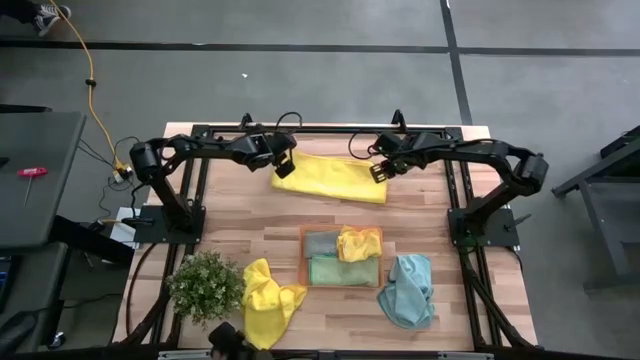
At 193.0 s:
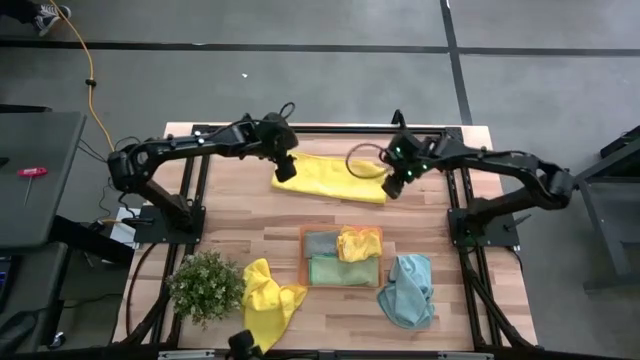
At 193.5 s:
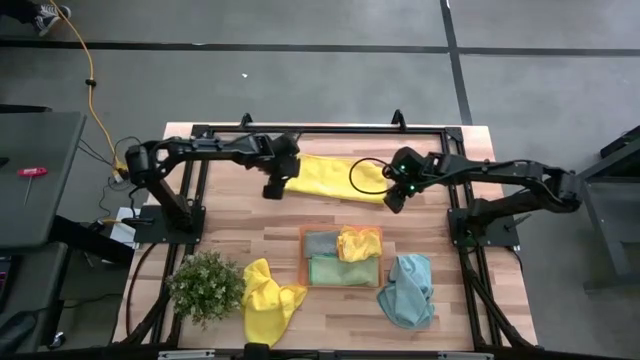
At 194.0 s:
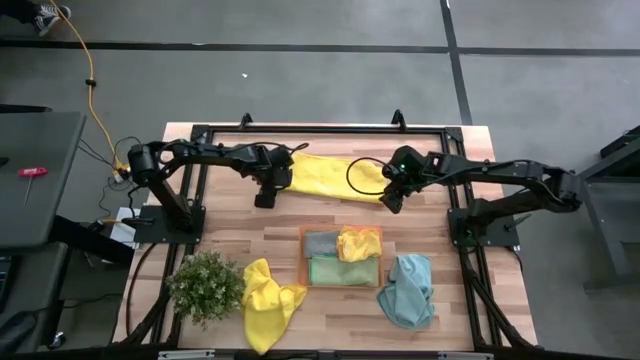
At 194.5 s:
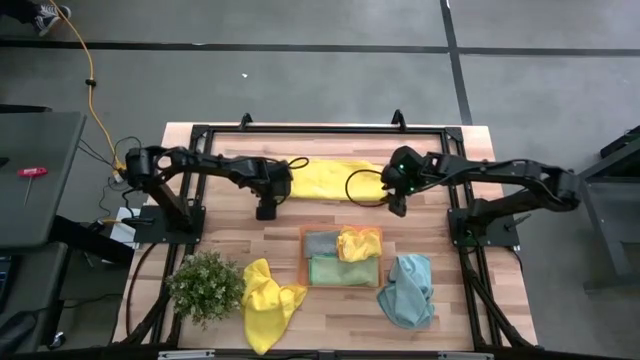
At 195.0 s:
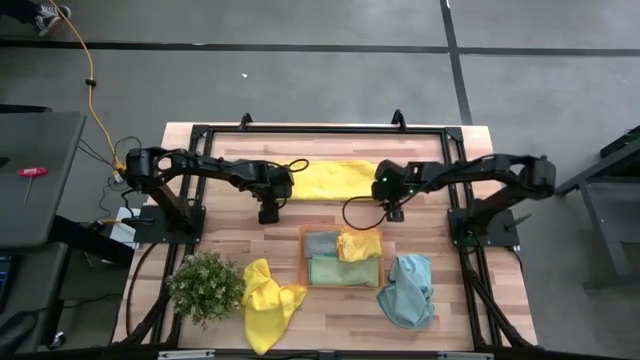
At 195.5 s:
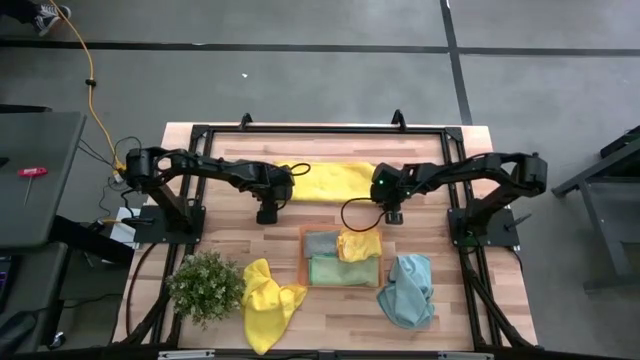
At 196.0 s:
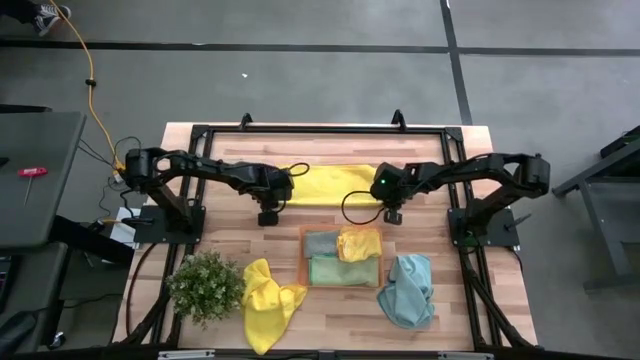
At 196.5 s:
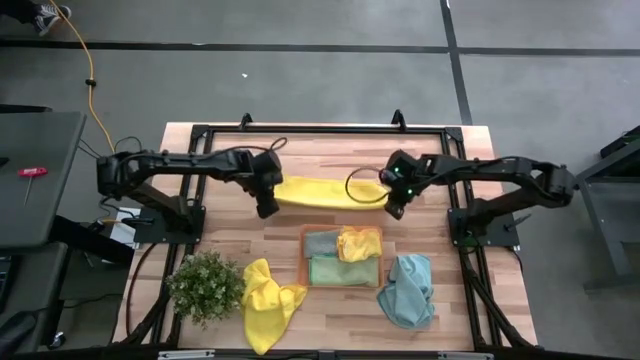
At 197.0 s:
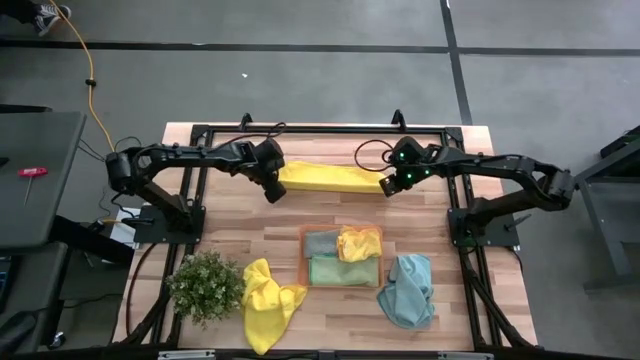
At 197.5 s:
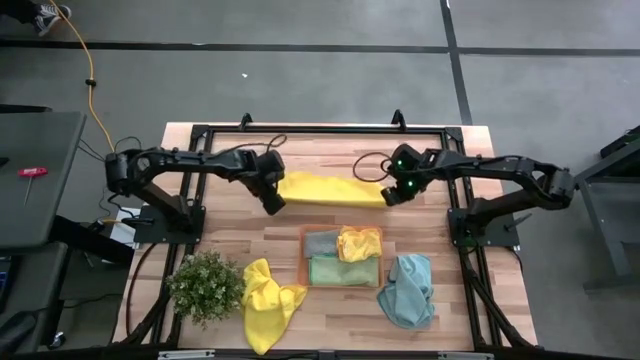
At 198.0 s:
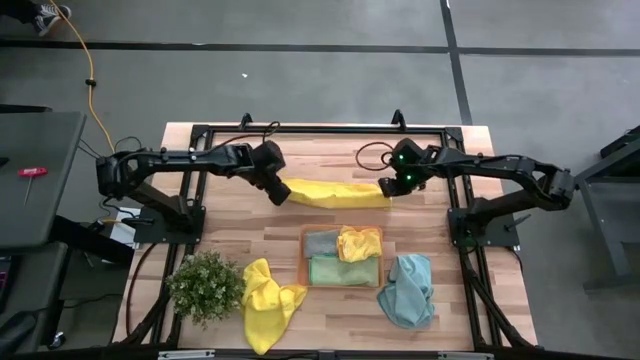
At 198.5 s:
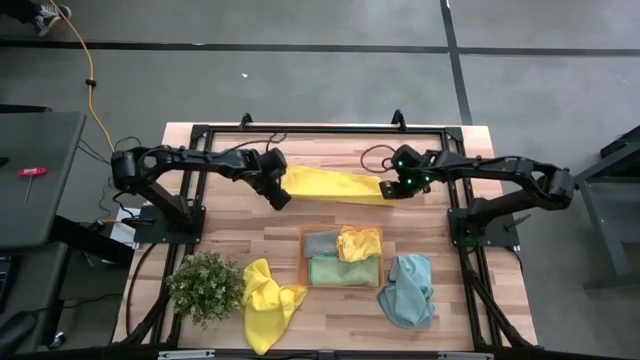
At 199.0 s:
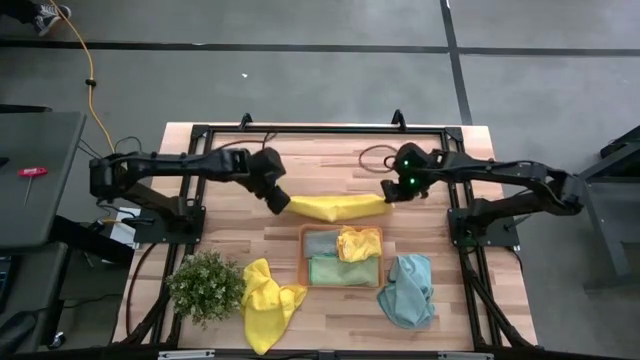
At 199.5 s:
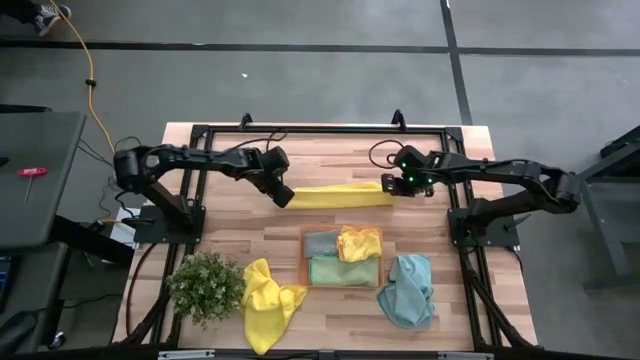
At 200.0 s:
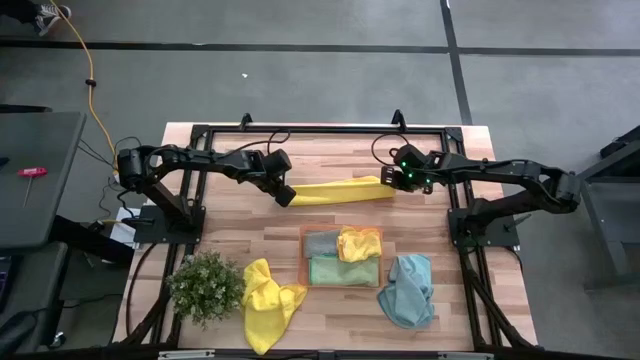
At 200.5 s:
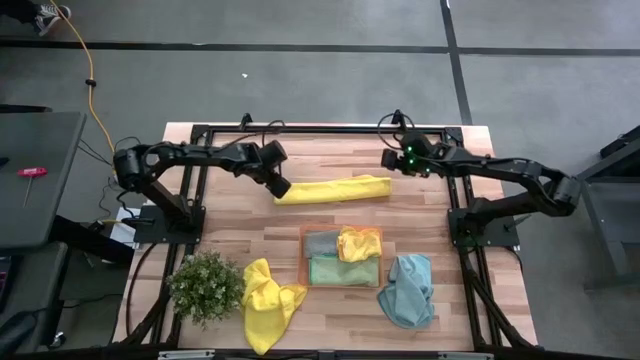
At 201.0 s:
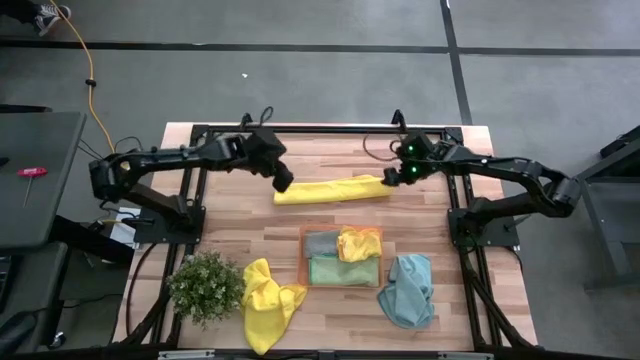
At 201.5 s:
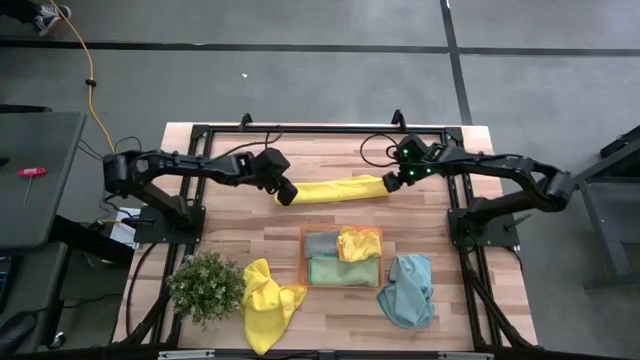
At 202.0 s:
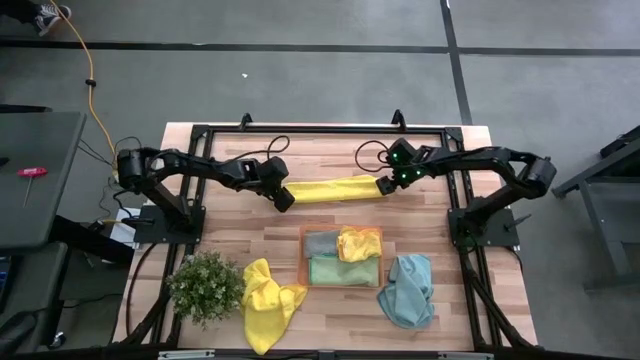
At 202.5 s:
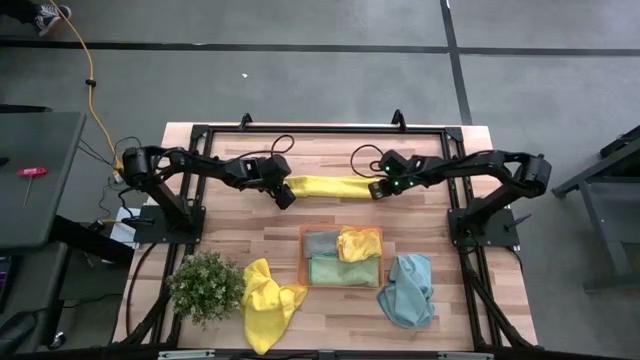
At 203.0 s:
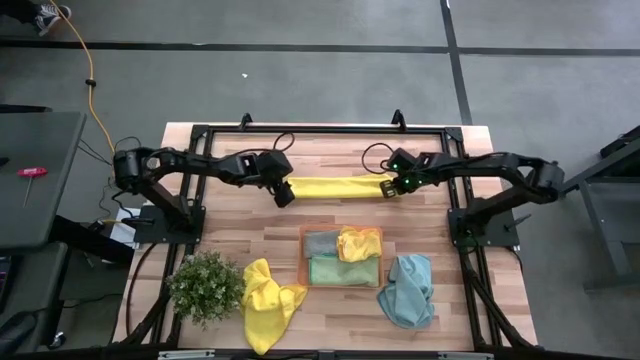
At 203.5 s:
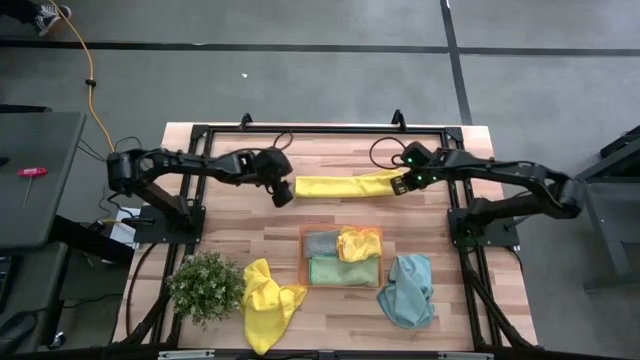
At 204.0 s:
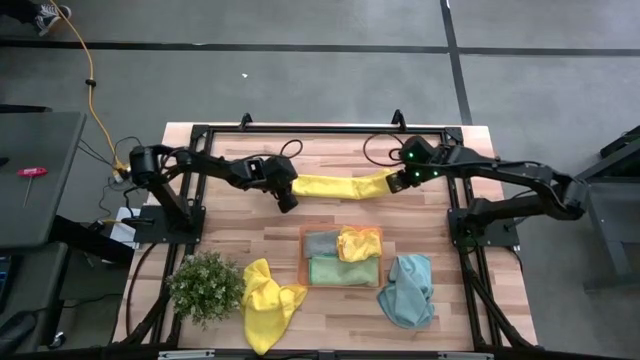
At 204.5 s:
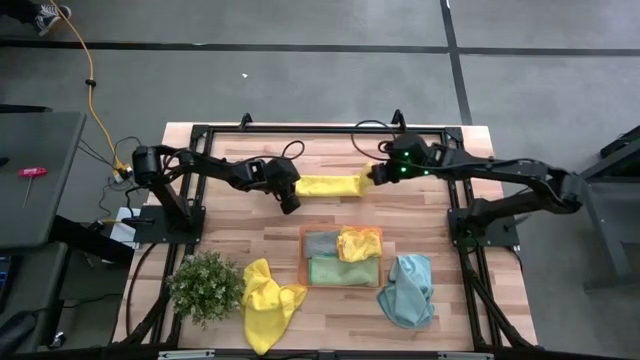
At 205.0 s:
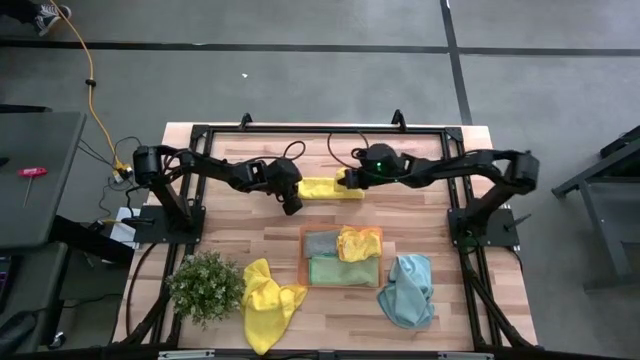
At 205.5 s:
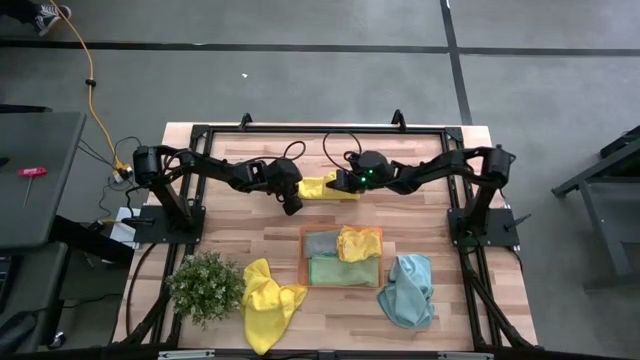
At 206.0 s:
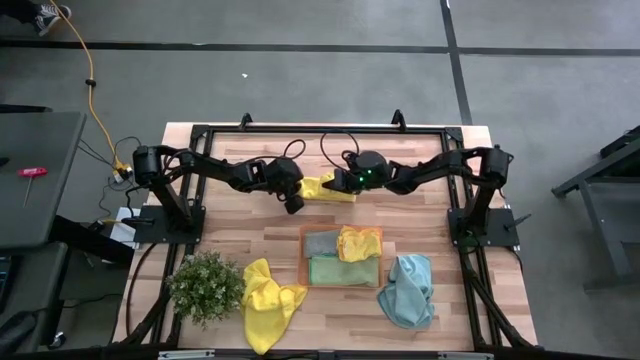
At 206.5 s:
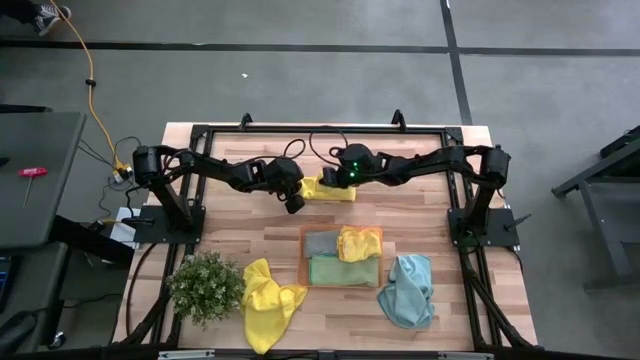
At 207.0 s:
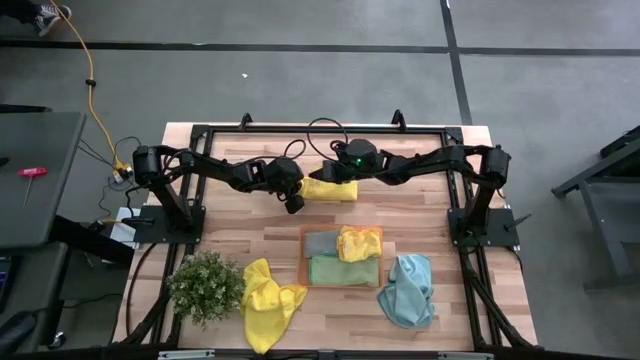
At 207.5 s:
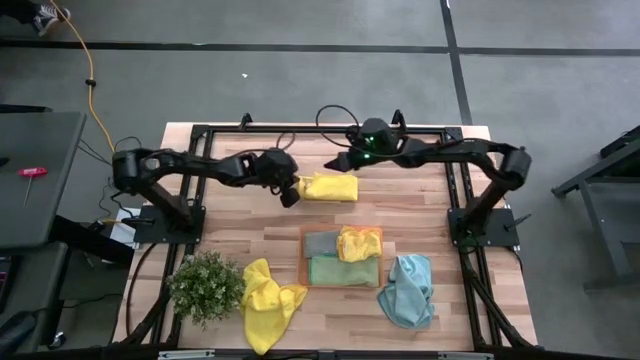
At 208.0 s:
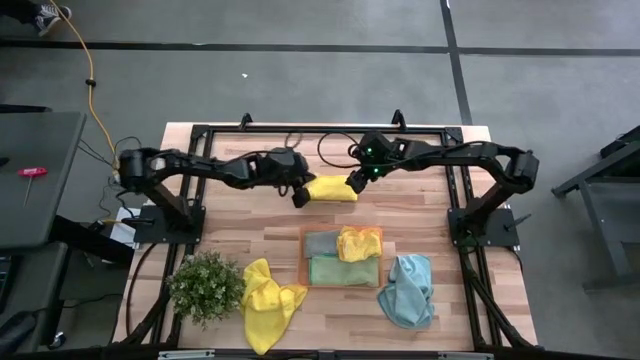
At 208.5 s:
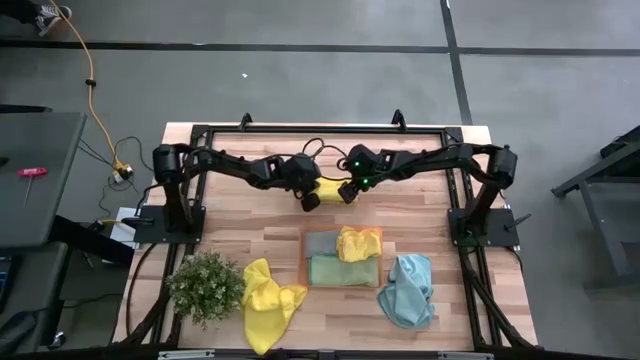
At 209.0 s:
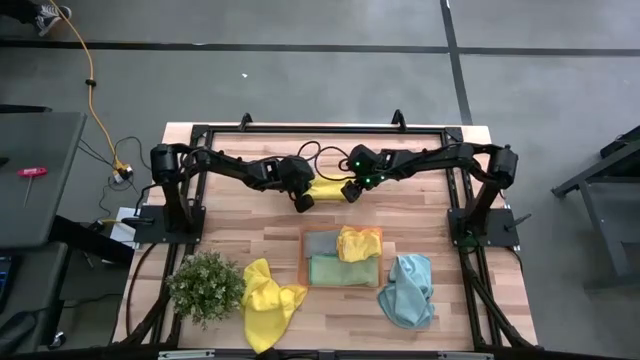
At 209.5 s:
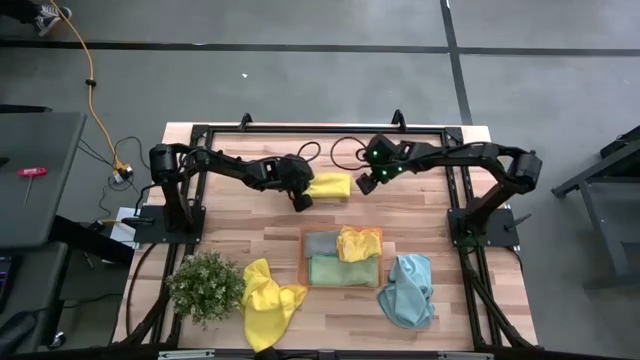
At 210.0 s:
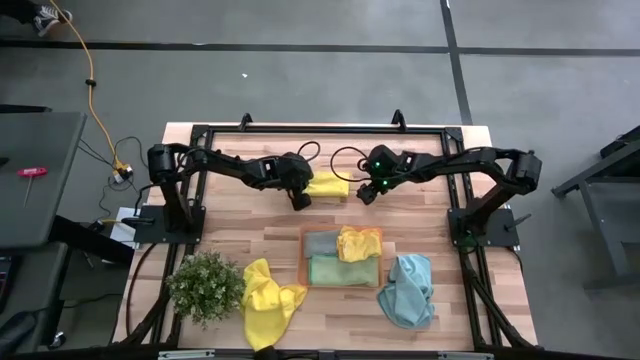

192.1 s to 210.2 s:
Task: Fold microfiber towels
Fold the right yellow microfiber towel

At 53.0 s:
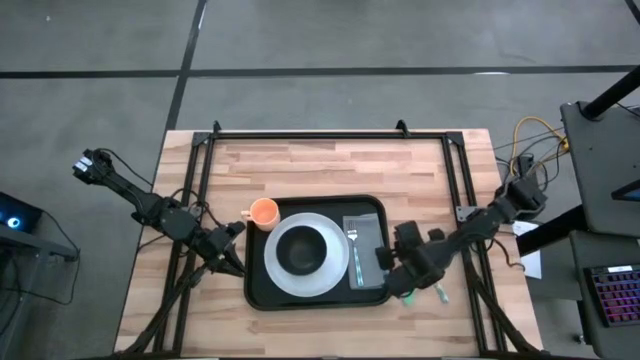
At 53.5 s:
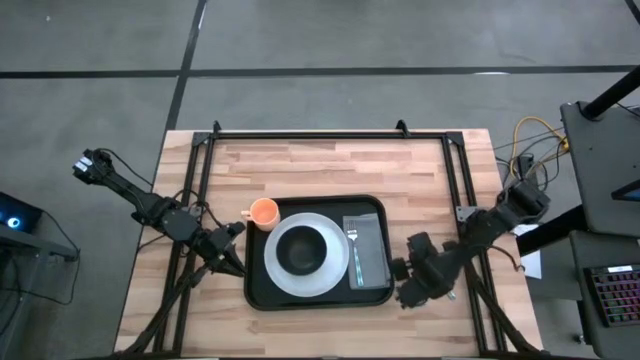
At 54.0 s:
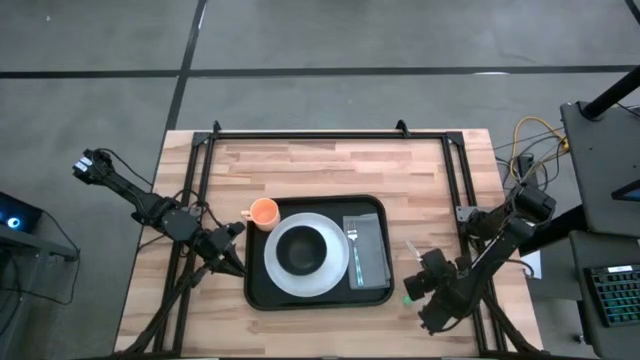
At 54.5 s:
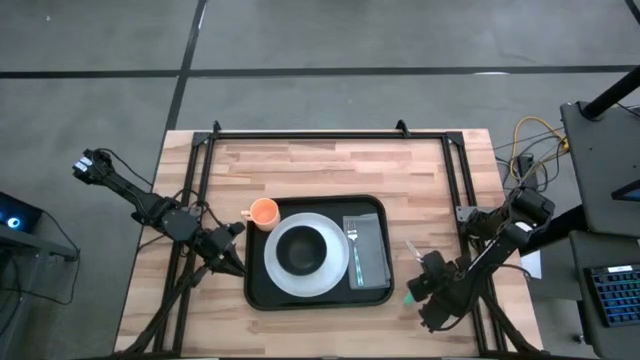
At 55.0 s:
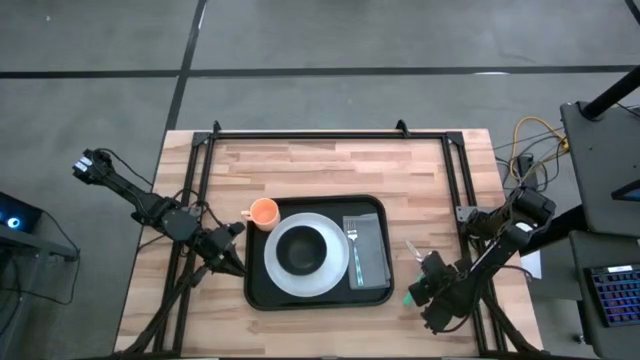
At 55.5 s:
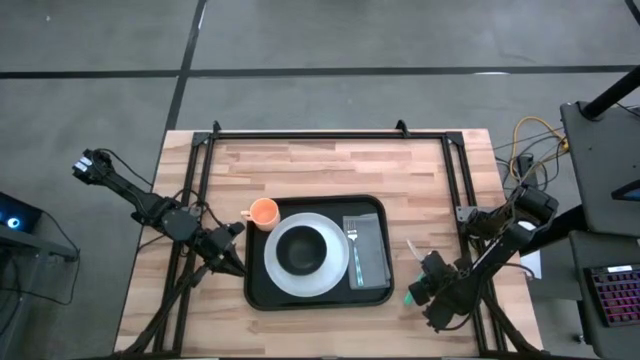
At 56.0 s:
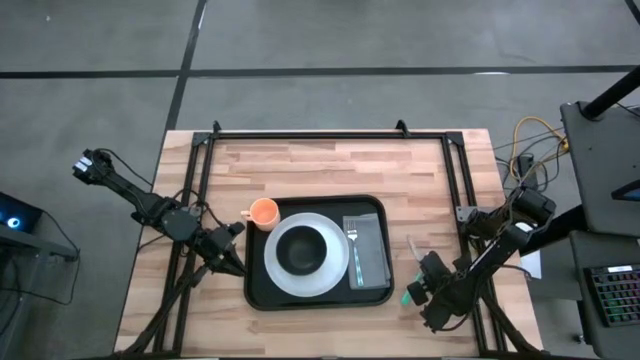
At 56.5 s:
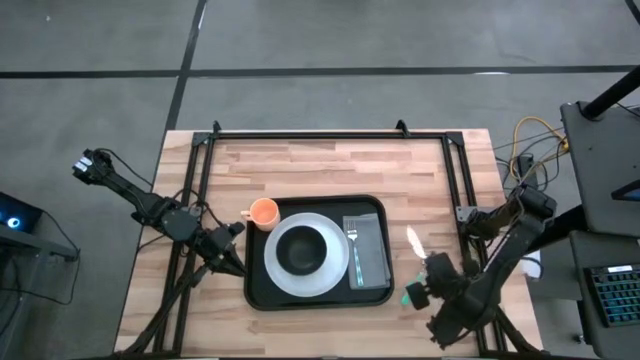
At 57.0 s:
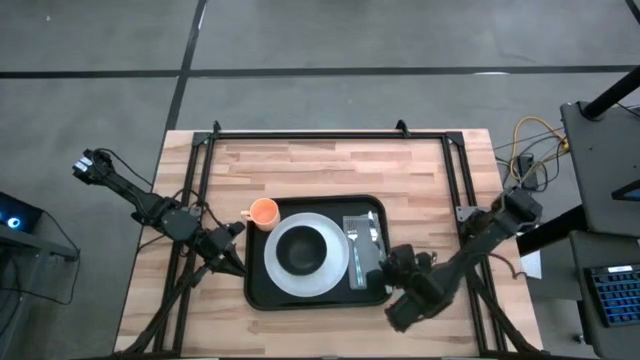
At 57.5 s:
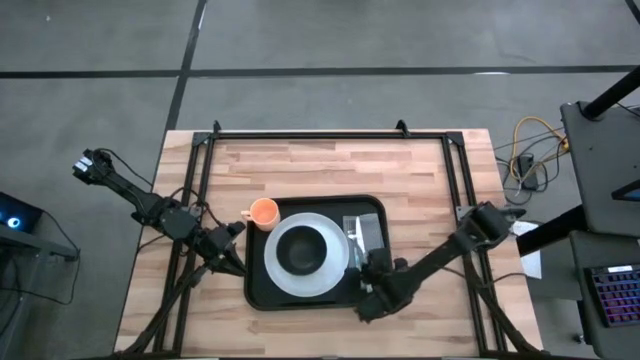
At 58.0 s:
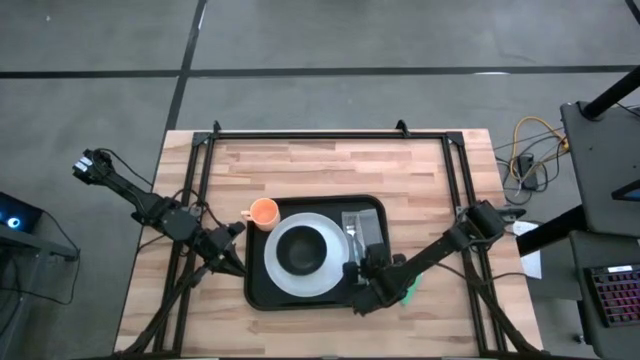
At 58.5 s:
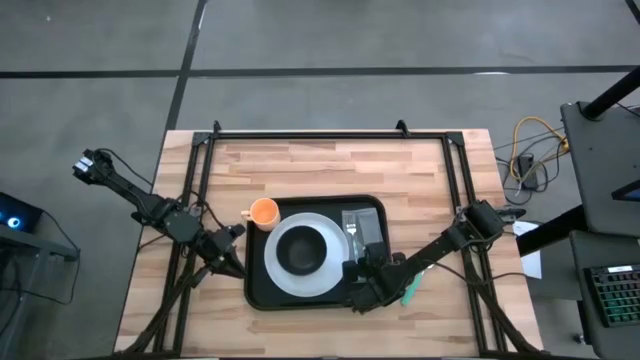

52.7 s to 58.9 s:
Task: Set up tray
Put the green knife on the gray napkin
